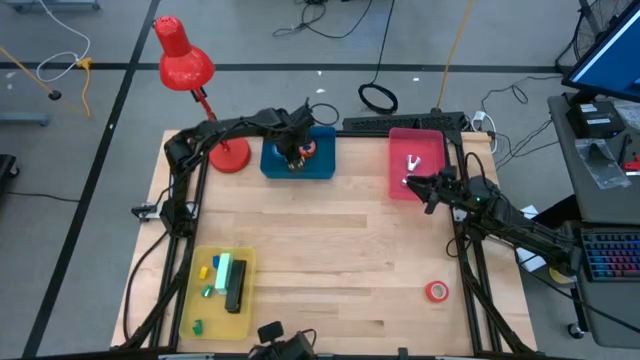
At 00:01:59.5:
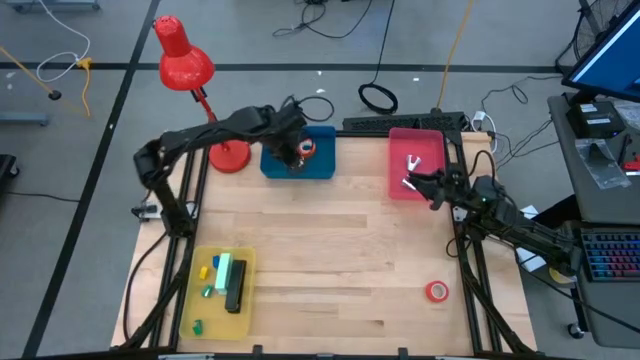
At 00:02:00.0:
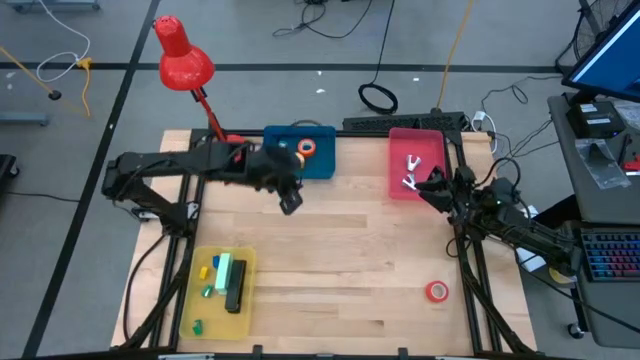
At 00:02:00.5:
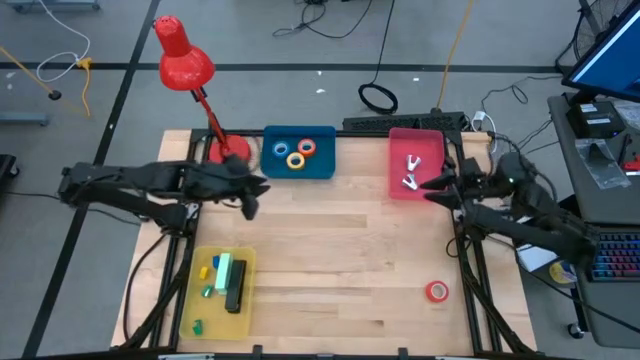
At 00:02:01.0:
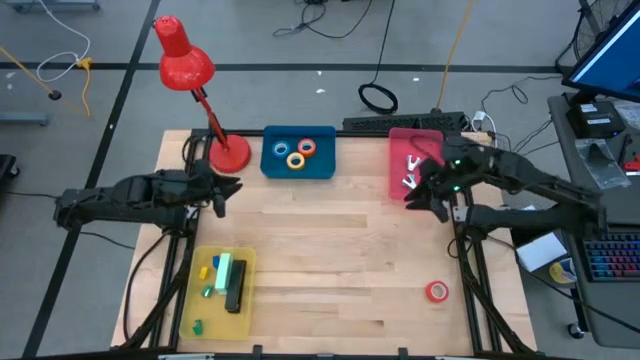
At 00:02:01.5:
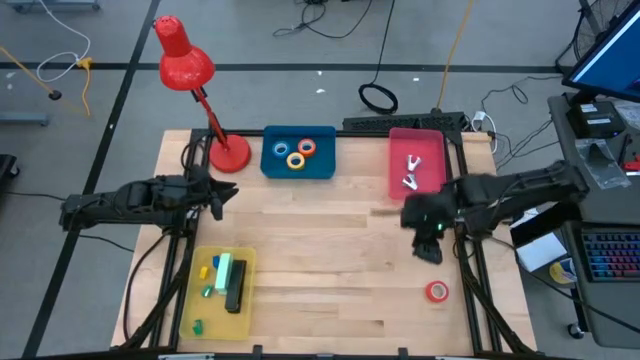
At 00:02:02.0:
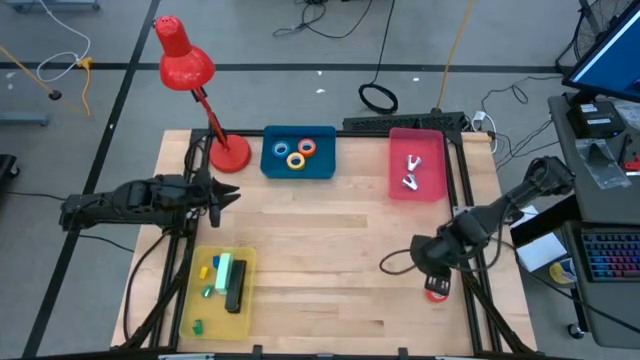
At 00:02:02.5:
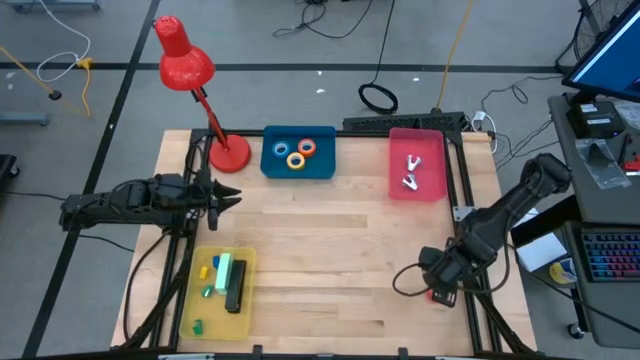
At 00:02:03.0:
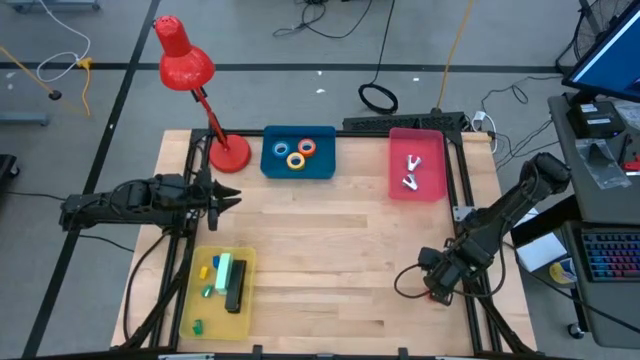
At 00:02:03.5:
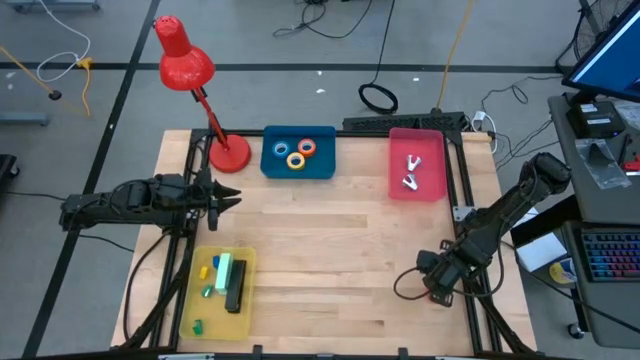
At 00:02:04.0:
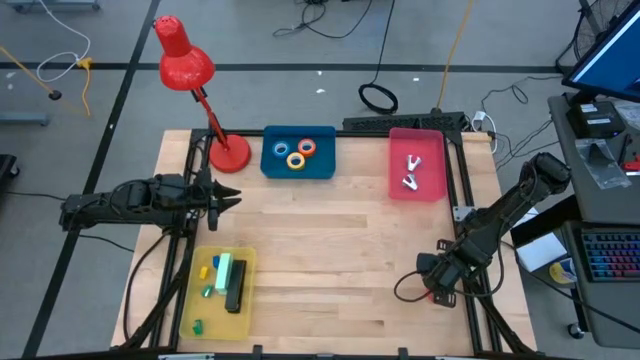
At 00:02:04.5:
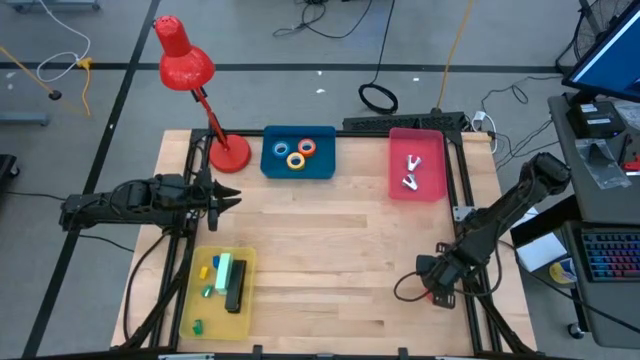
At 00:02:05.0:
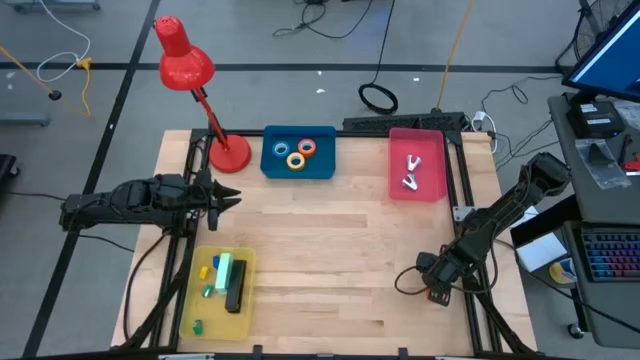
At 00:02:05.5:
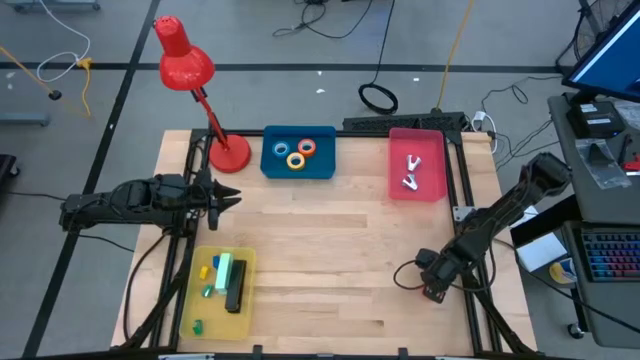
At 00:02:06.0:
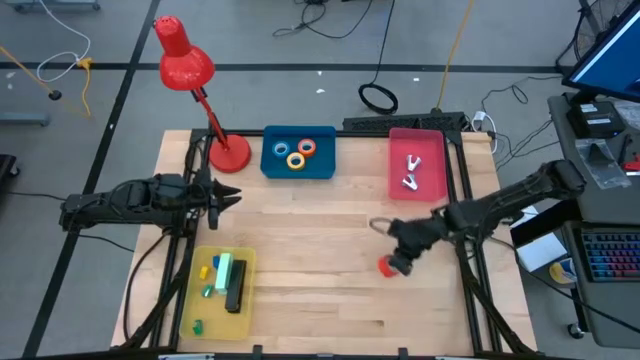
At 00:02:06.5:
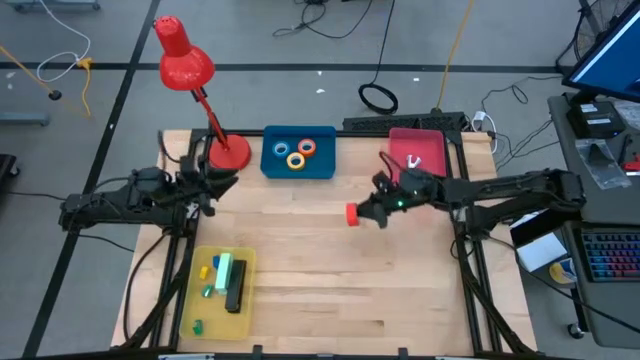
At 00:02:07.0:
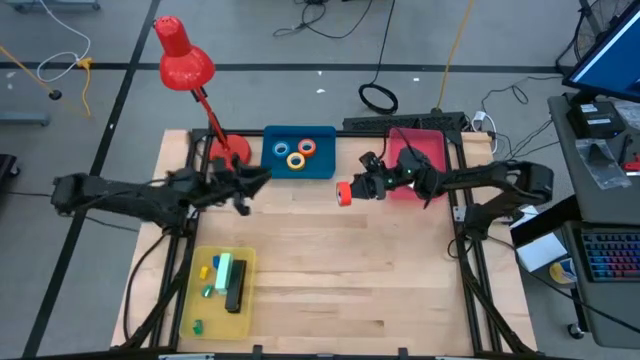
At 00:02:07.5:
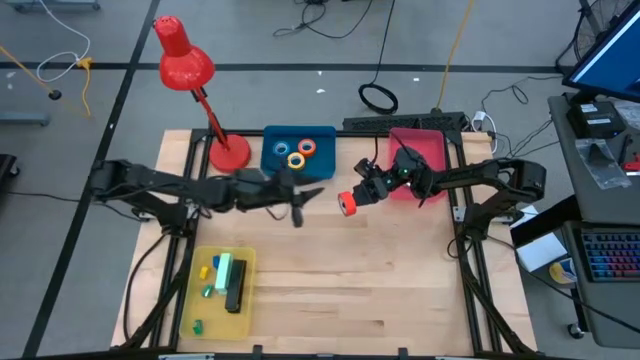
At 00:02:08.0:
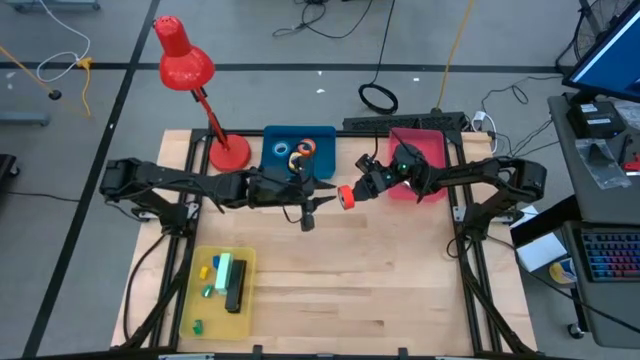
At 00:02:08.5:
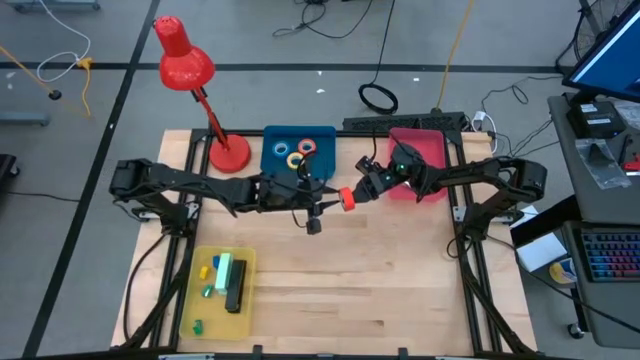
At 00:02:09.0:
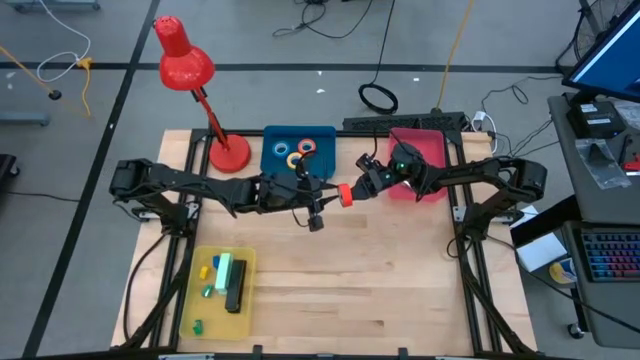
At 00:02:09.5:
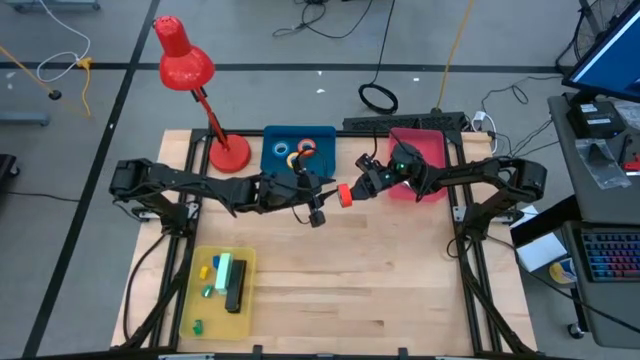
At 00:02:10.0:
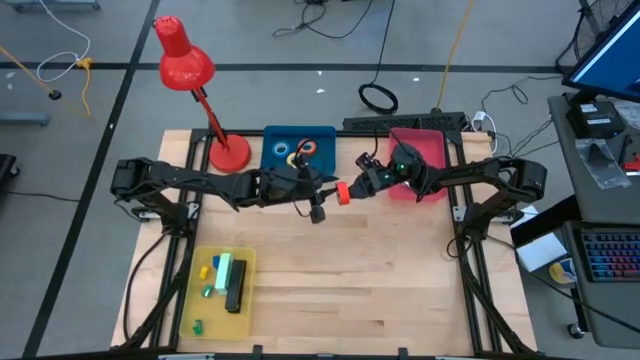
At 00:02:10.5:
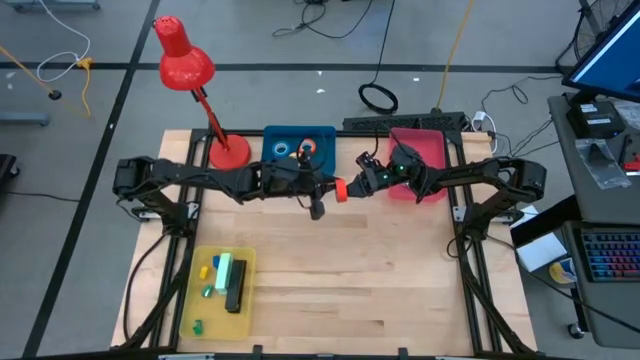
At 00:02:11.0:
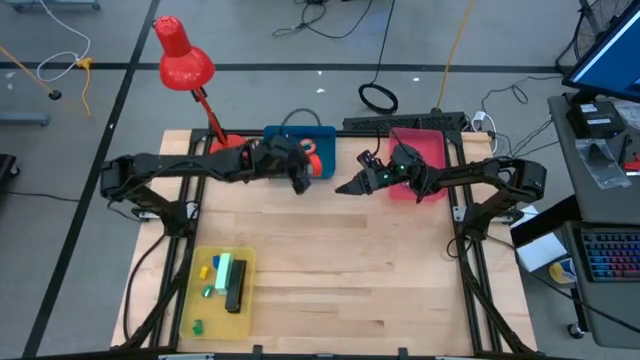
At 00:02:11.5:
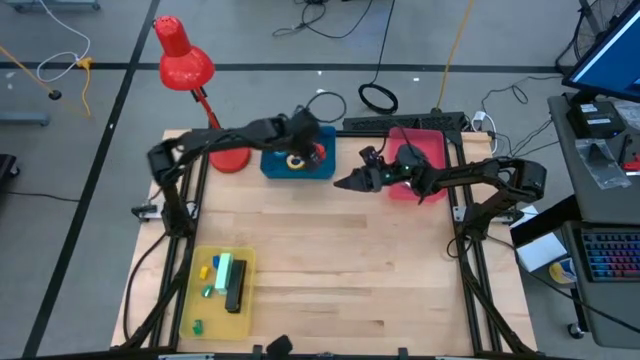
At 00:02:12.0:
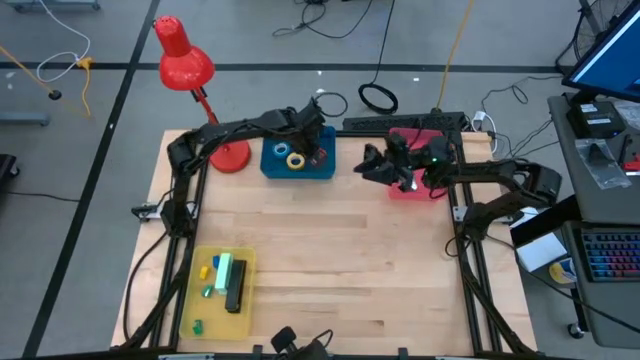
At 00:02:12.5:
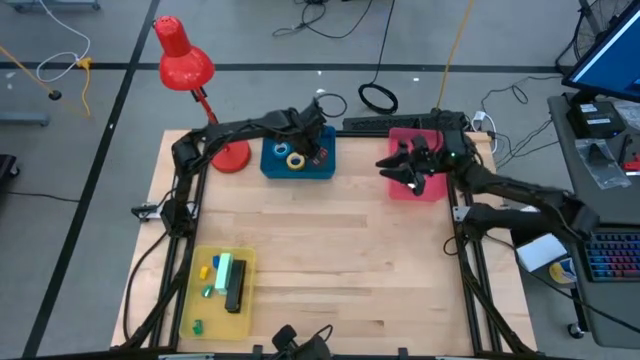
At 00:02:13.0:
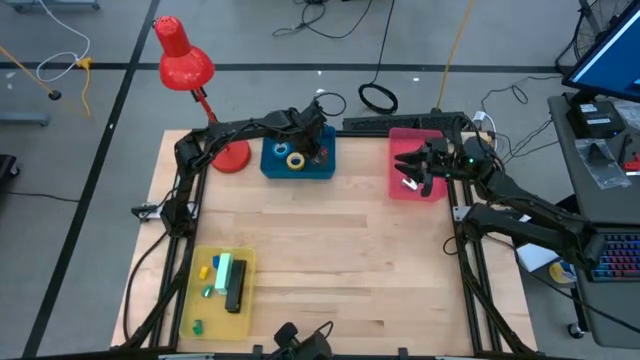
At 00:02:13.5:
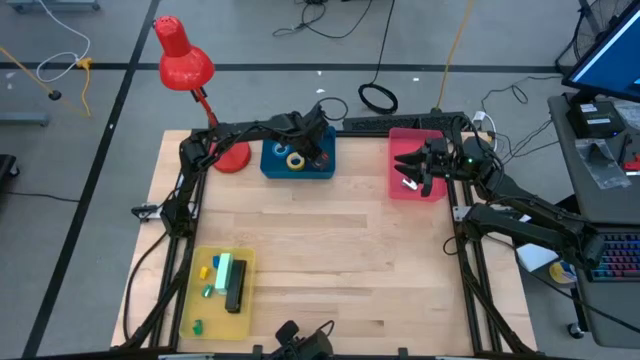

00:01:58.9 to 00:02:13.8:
Task: Pick and place Stapler, Stapler remover, tape
Put the red tape into the blue bin

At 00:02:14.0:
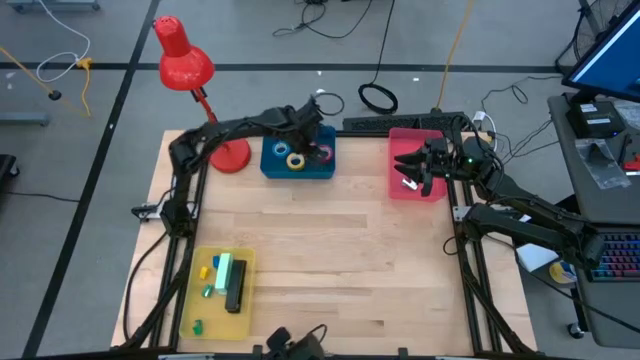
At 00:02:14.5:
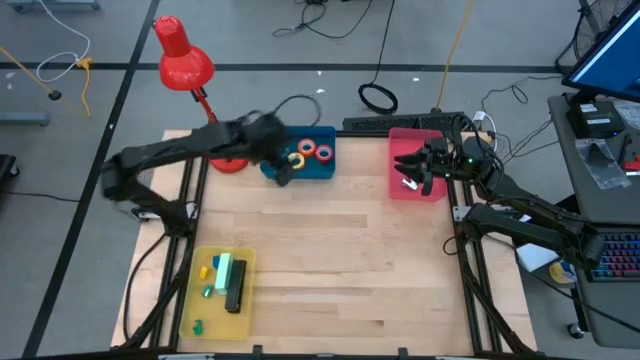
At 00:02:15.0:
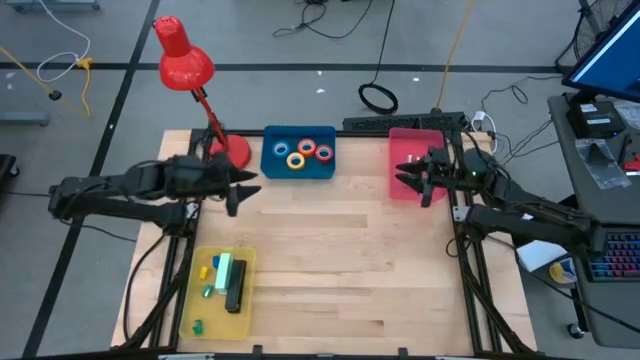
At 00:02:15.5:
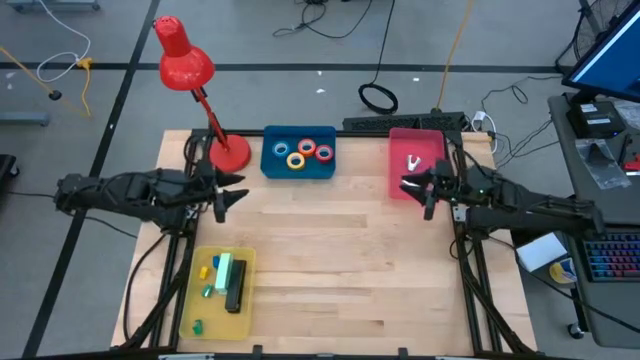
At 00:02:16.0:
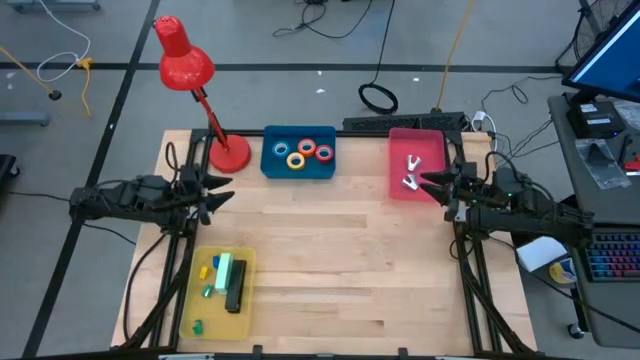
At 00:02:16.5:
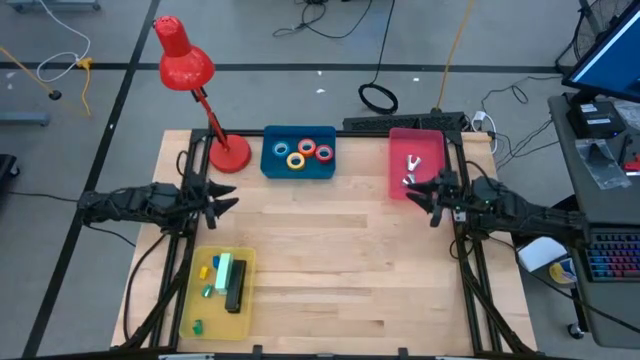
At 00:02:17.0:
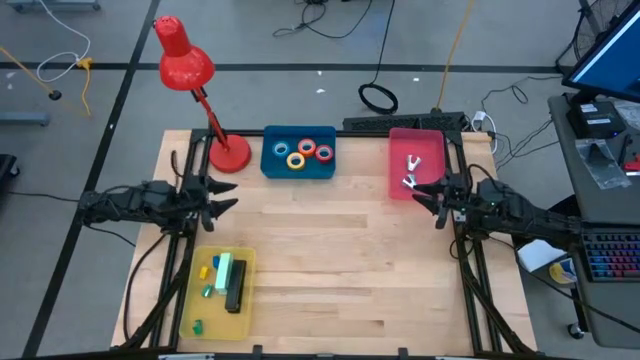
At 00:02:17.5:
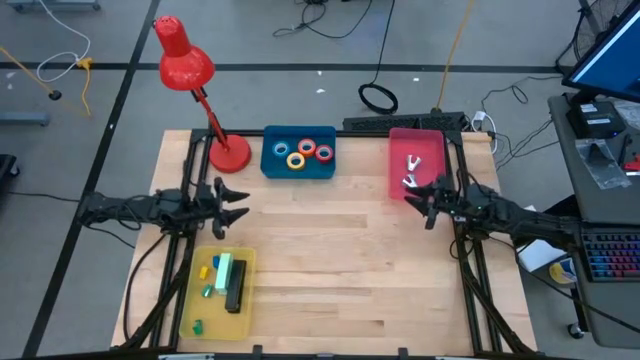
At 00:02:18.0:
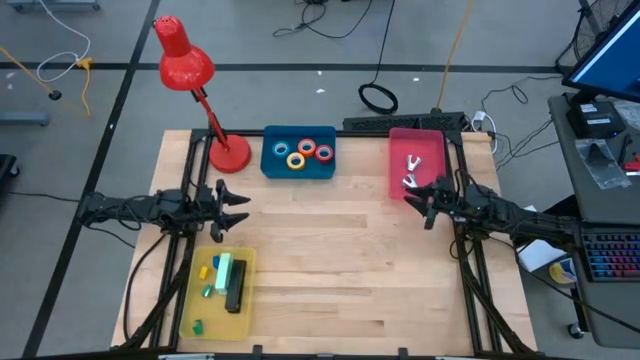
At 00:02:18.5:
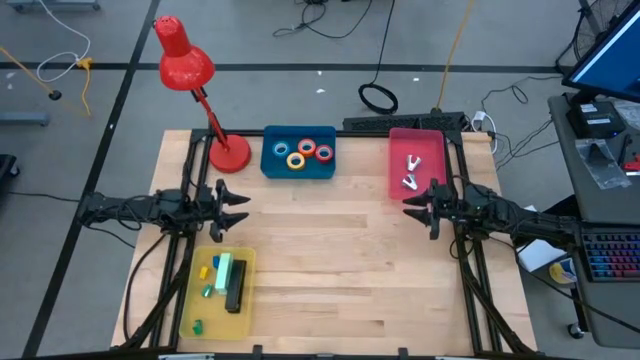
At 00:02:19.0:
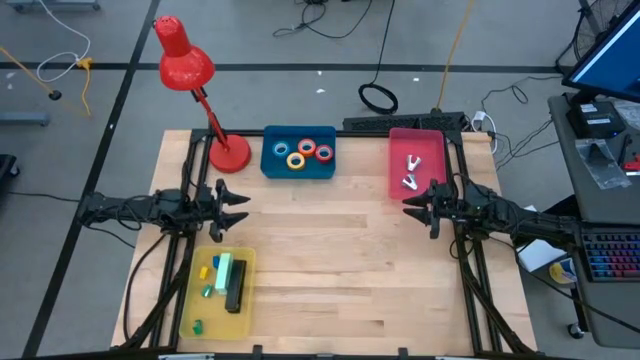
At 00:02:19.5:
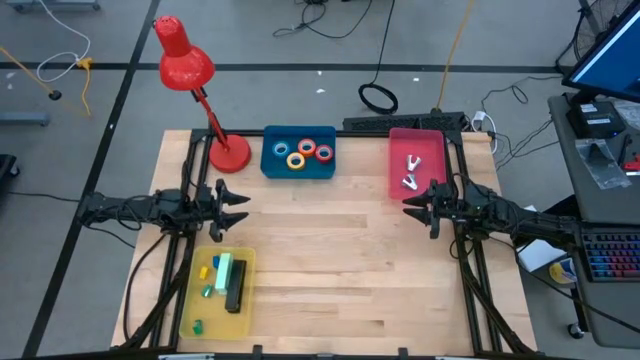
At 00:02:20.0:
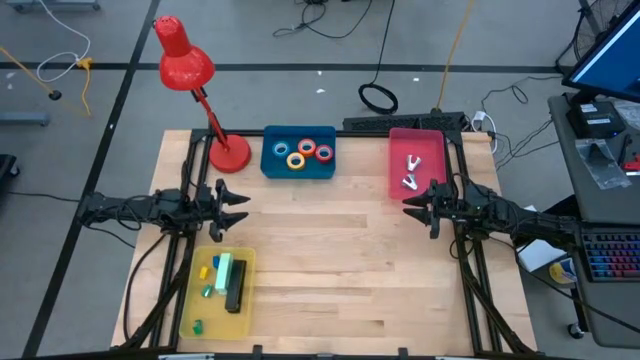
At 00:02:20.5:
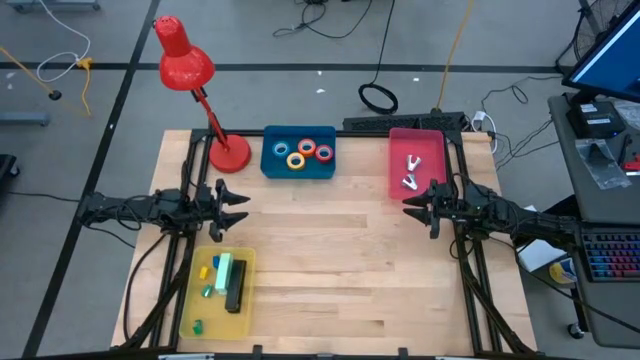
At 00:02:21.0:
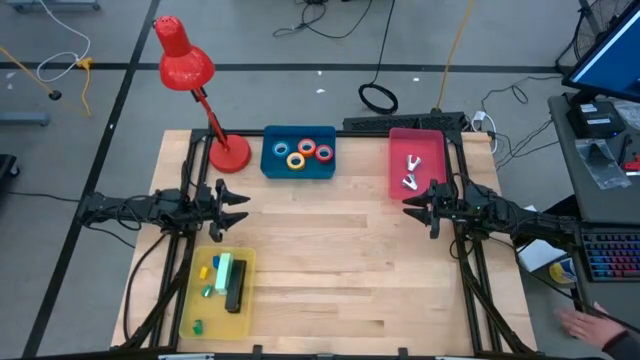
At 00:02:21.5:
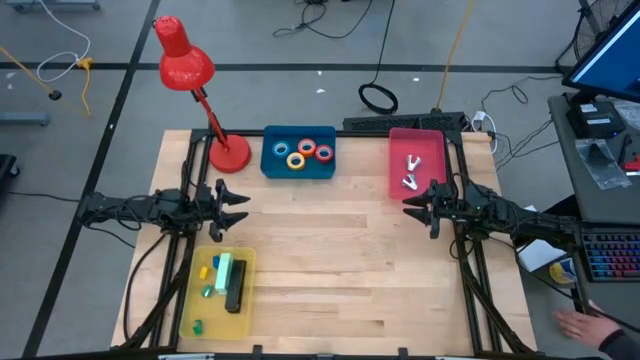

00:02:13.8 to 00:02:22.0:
Return to Home Position
